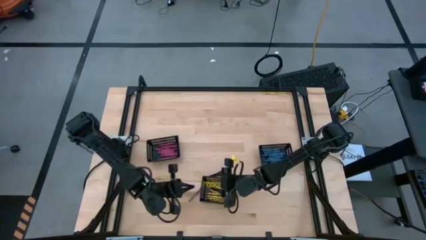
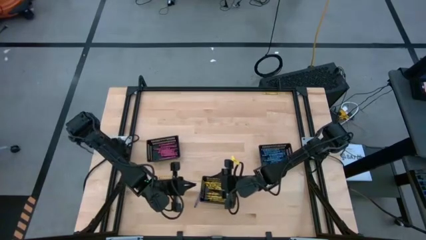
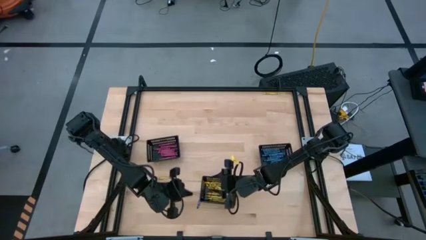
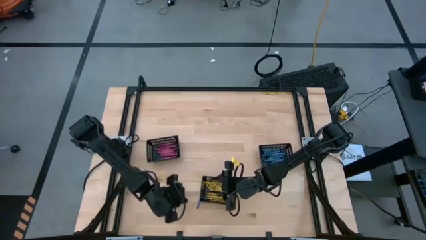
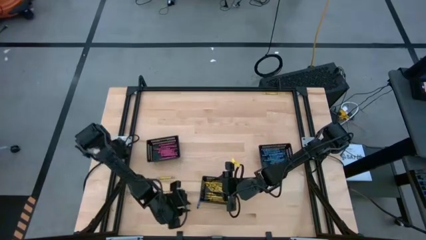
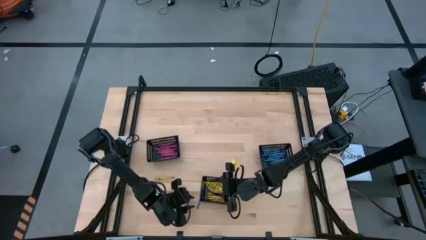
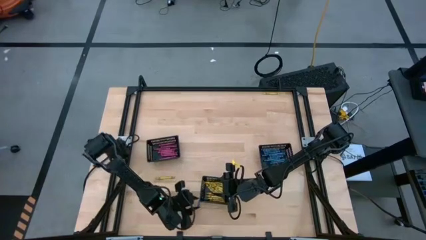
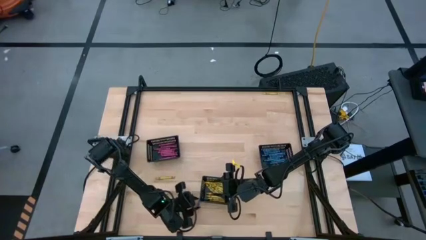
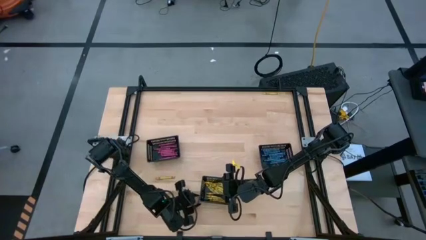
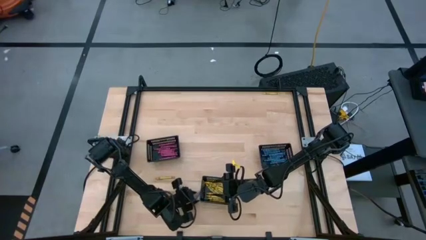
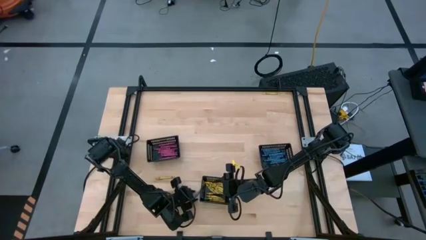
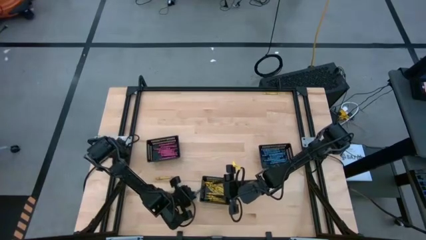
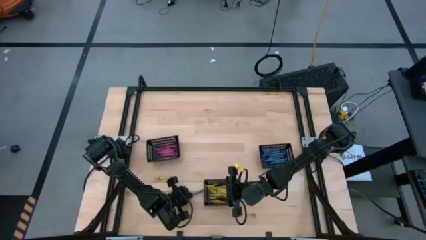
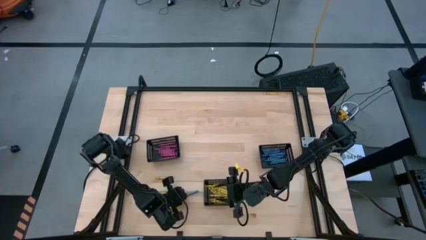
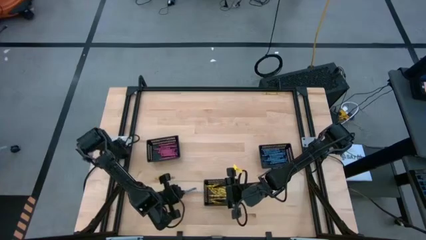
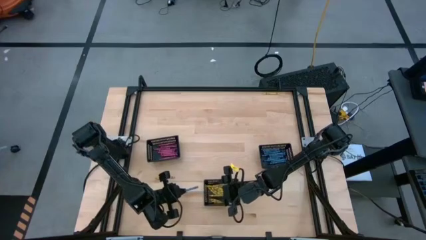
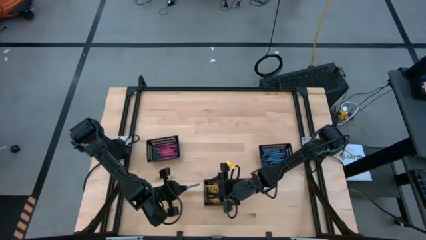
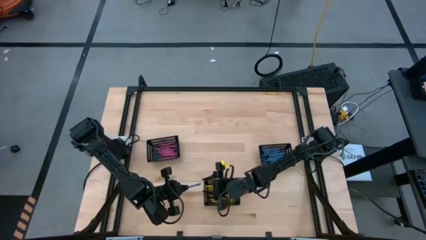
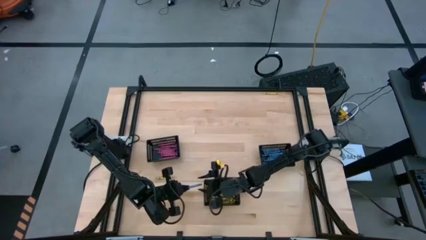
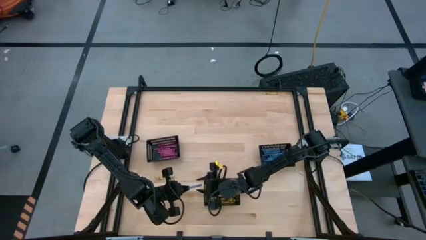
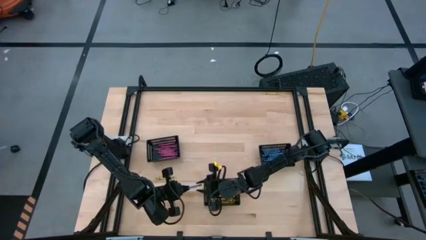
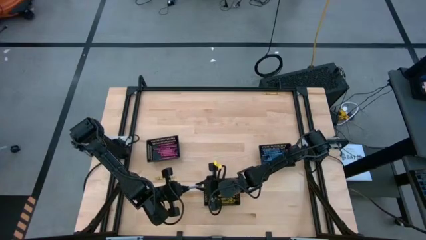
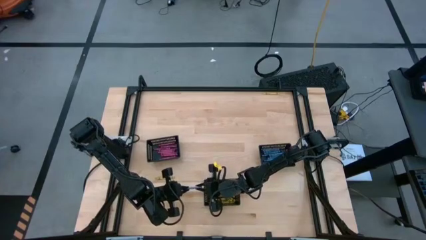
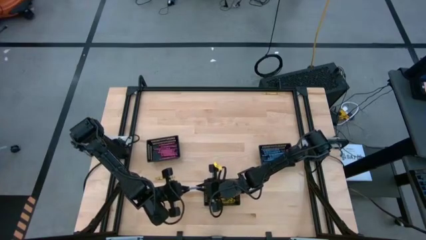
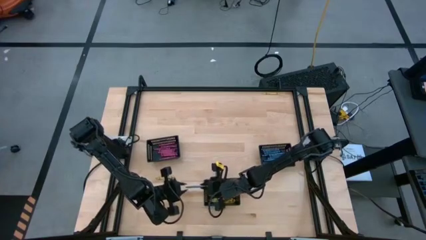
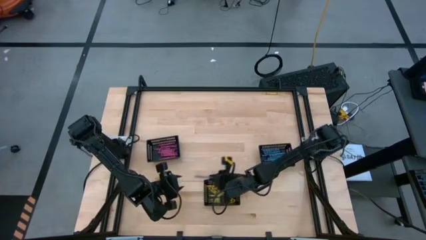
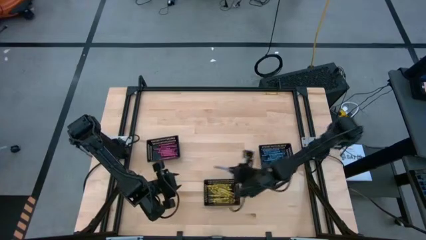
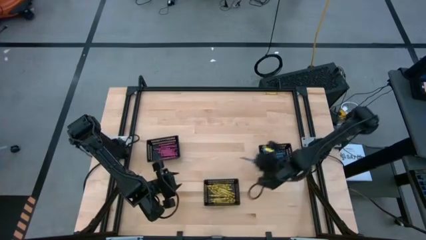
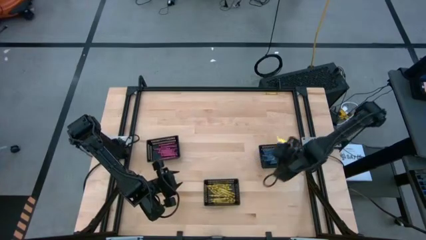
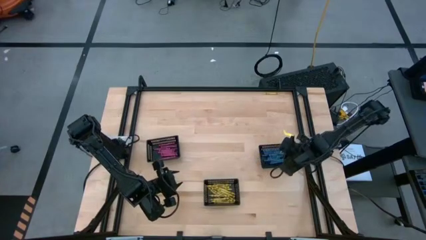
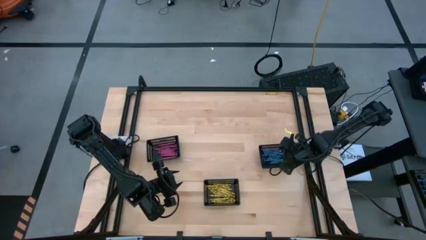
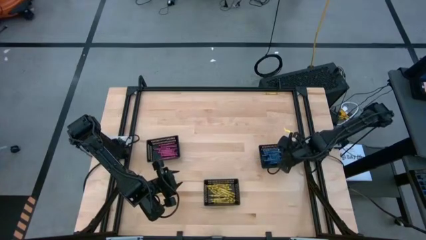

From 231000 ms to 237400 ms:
Task: Sort crayons
Put the blue crayon into the right black bin

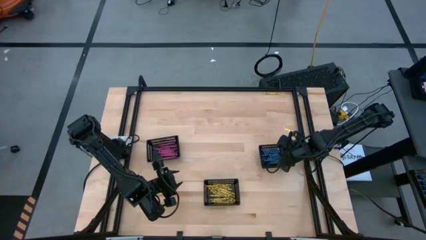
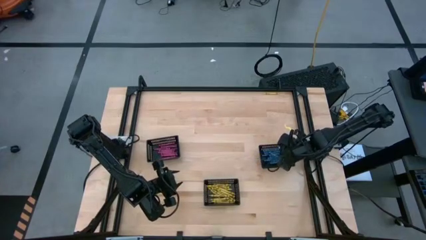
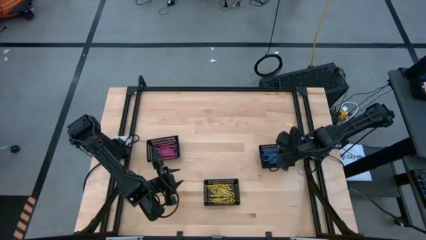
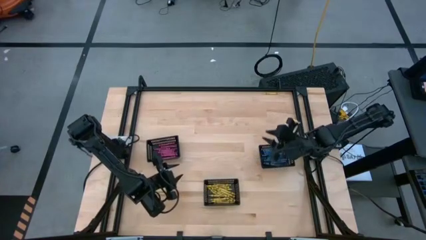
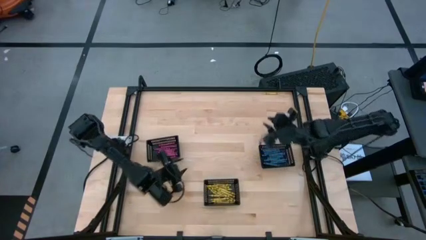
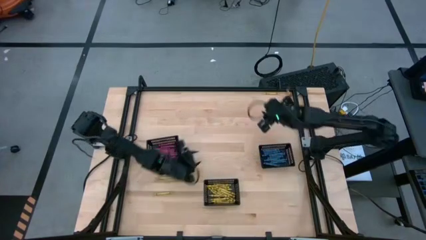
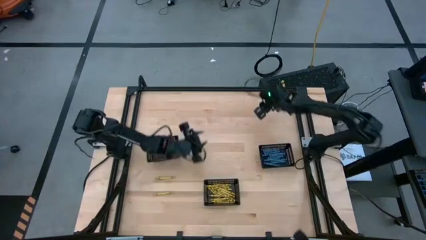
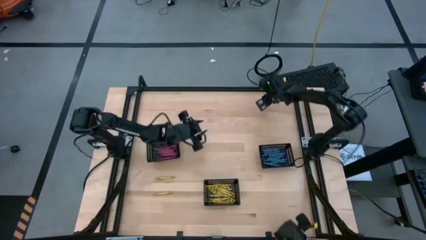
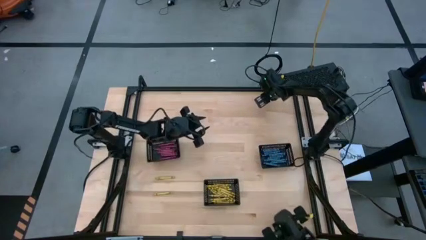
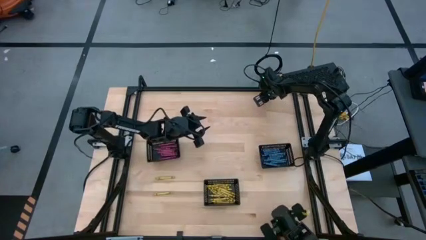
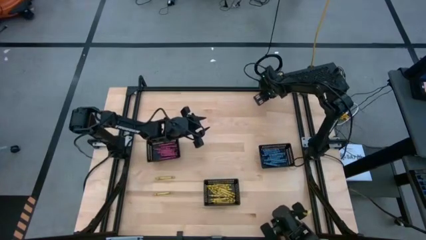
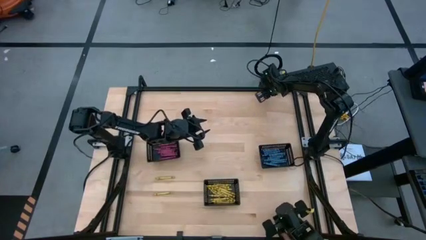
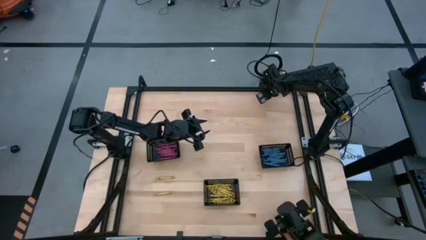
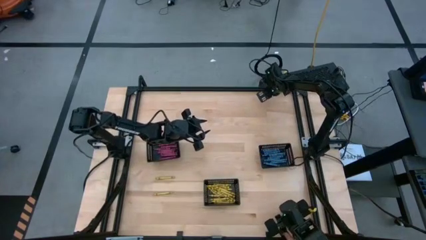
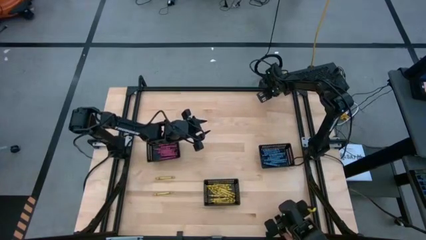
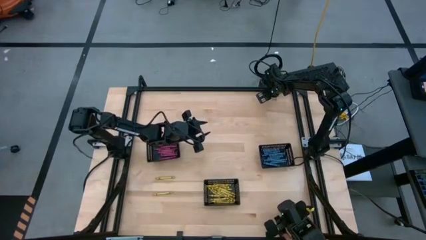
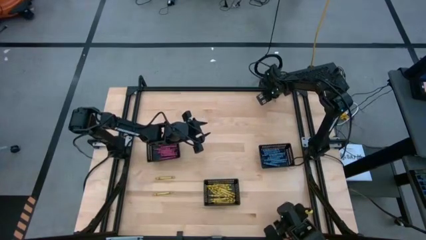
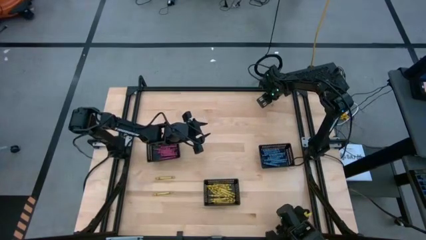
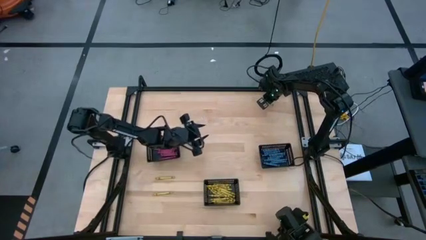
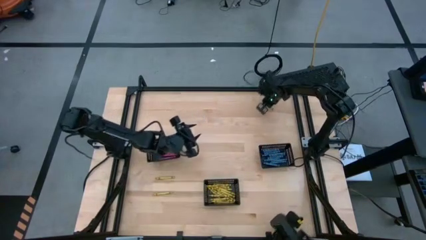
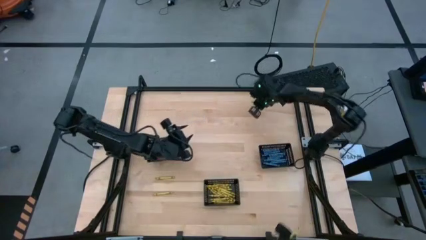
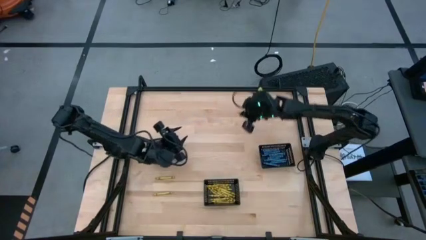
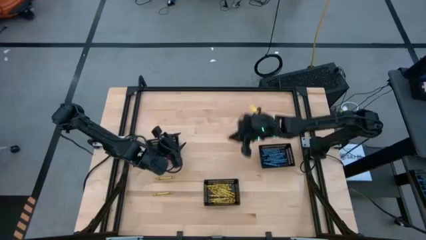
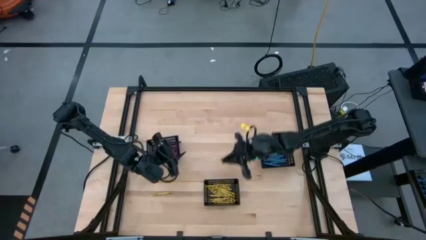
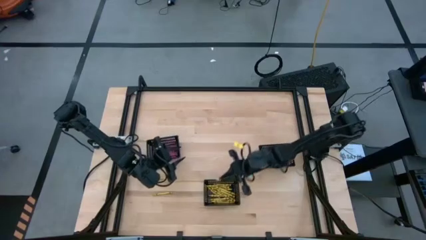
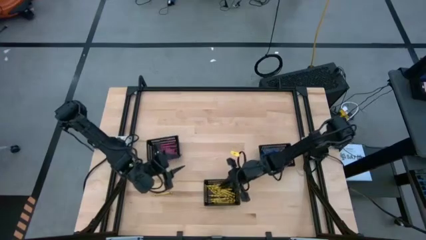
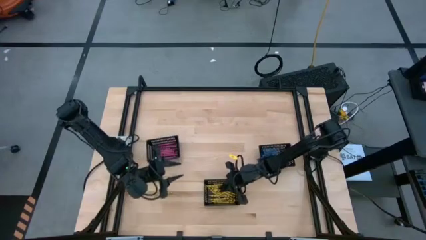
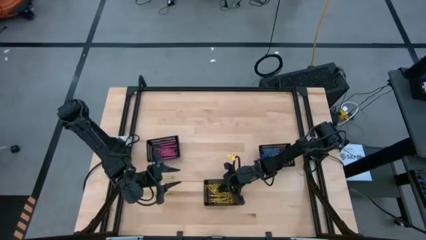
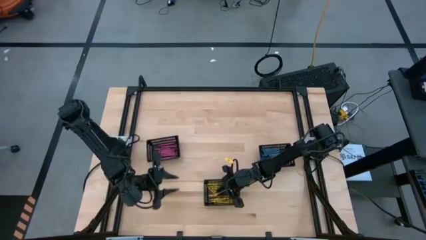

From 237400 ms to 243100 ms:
Put the yellow crayon into the bottom black bin

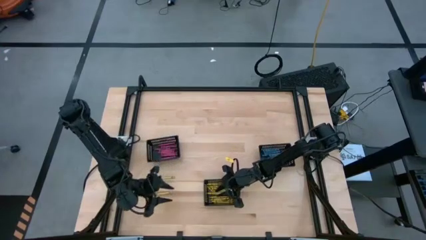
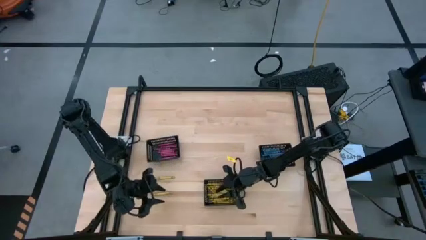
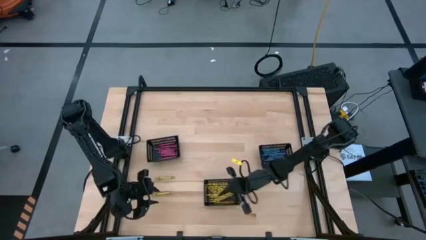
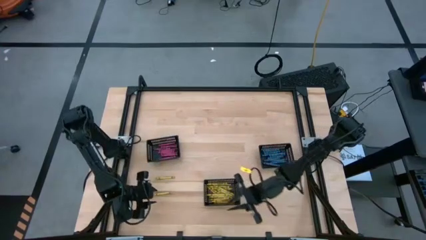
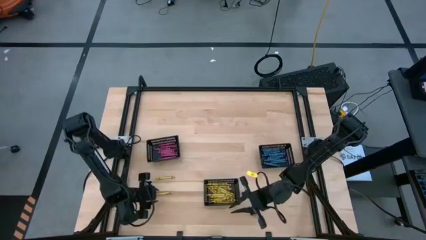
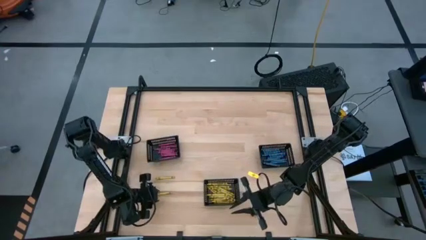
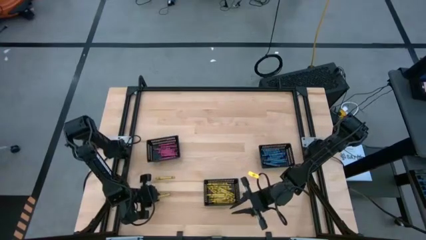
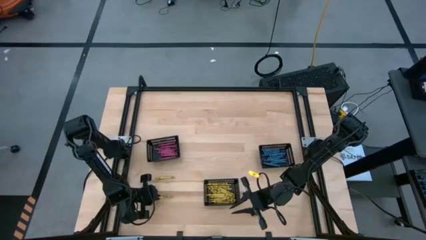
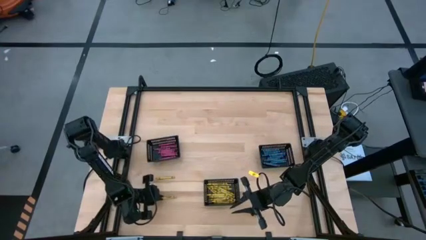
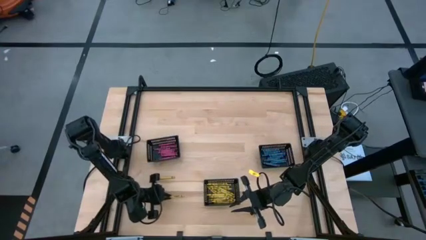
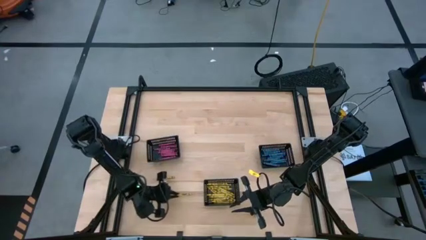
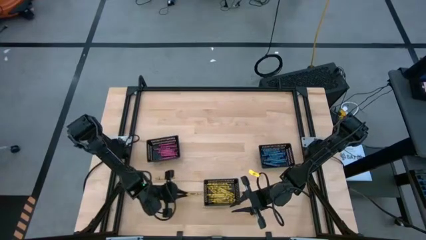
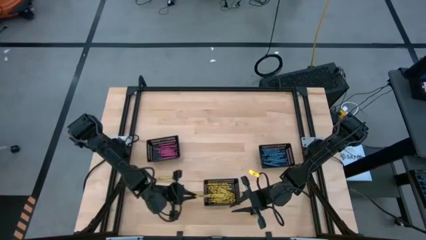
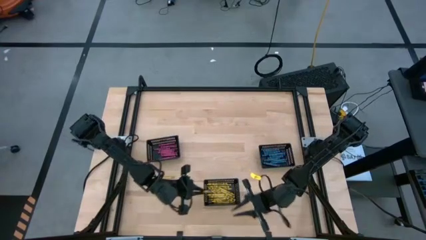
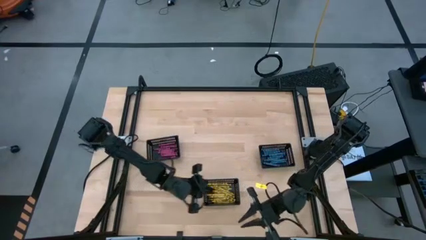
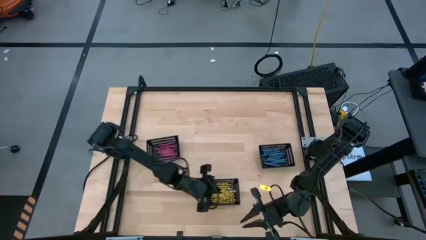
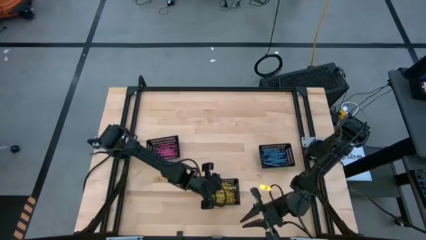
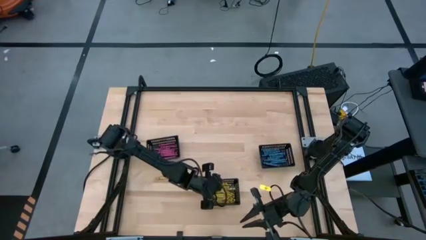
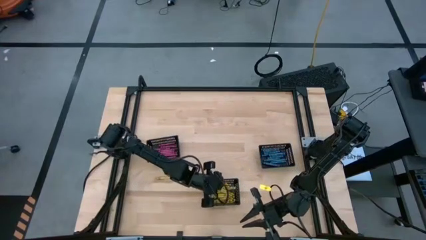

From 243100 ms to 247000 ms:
Put the yellow crayon into the bottom black bin
